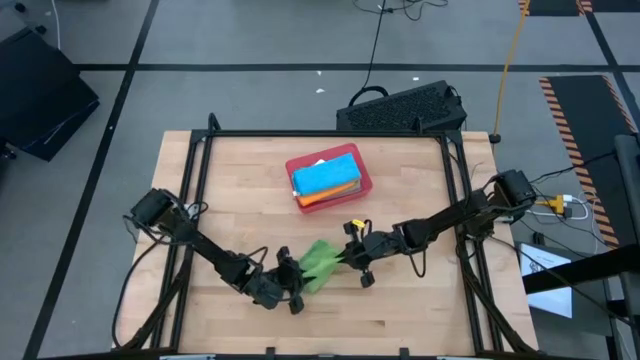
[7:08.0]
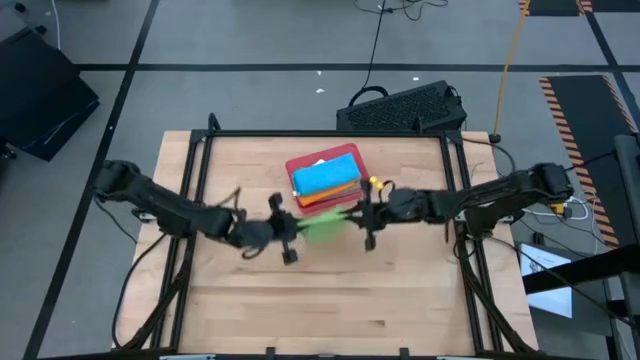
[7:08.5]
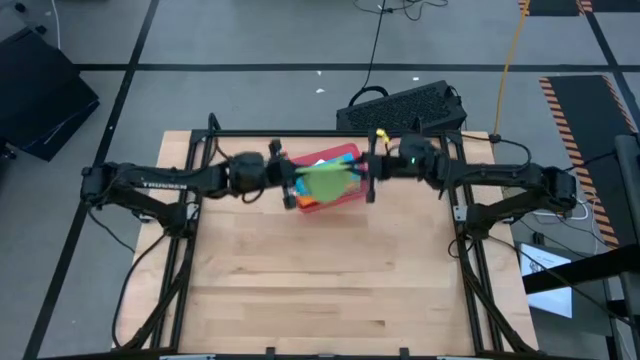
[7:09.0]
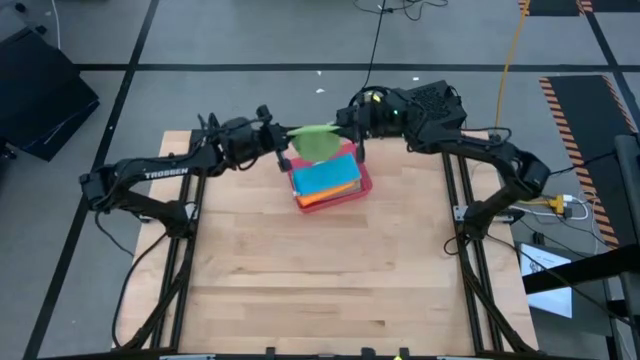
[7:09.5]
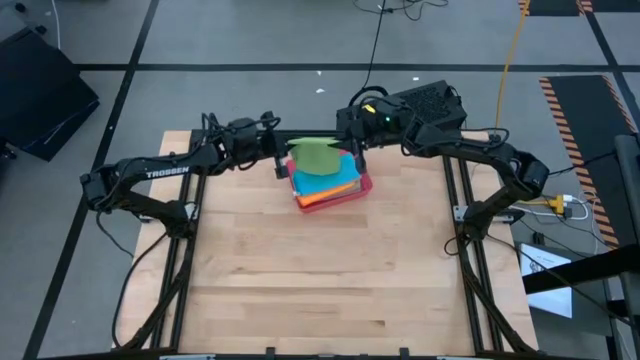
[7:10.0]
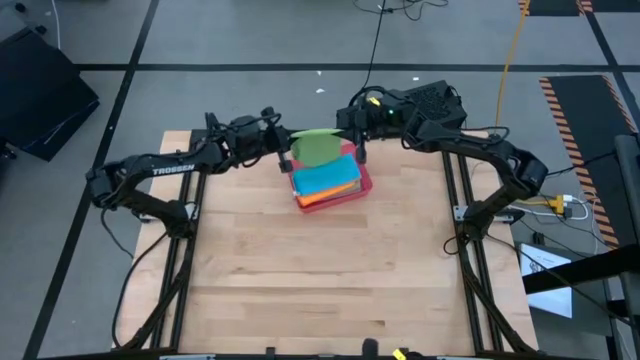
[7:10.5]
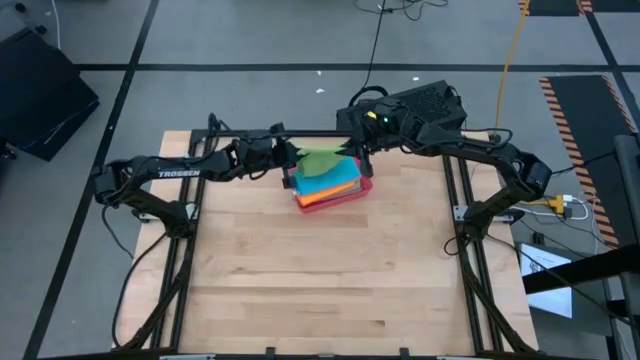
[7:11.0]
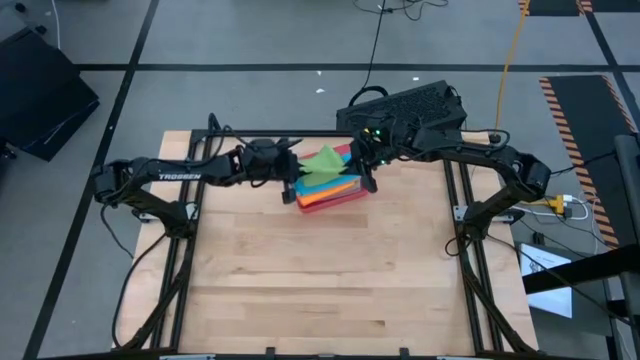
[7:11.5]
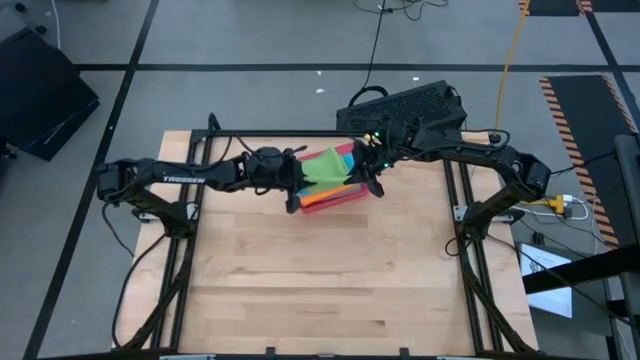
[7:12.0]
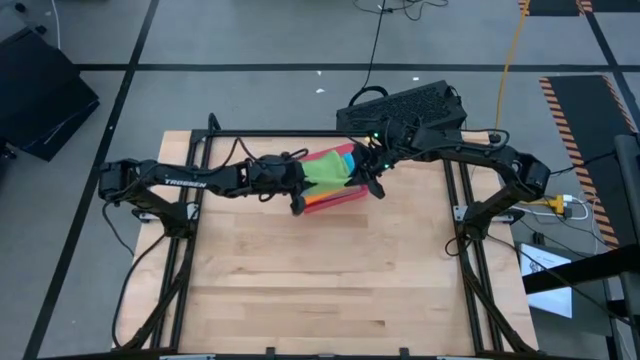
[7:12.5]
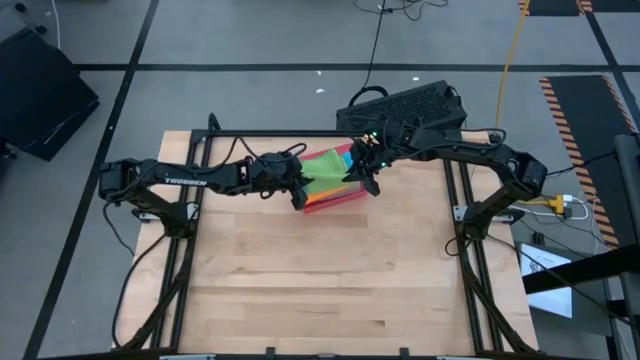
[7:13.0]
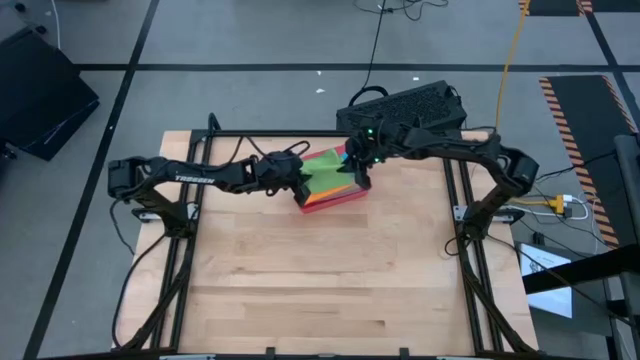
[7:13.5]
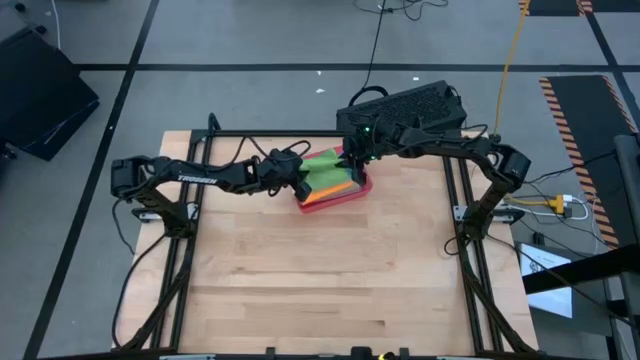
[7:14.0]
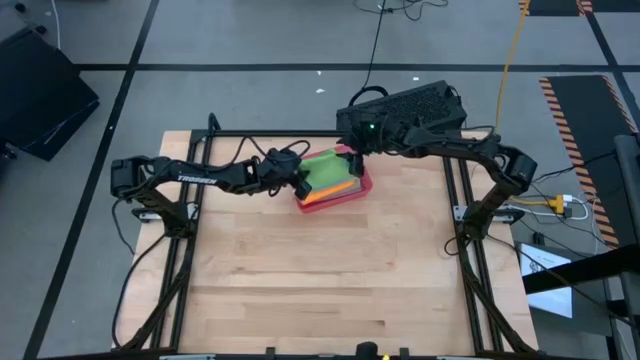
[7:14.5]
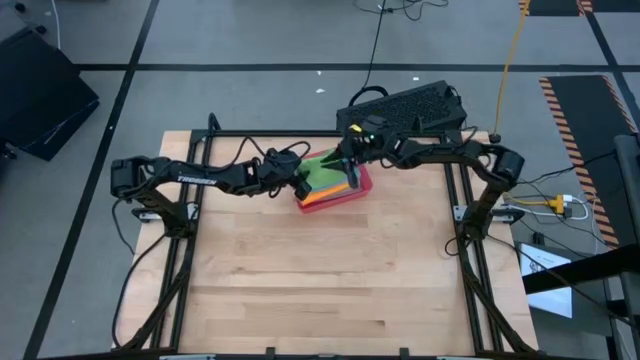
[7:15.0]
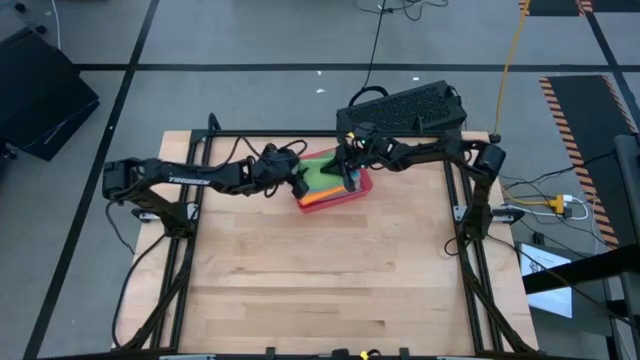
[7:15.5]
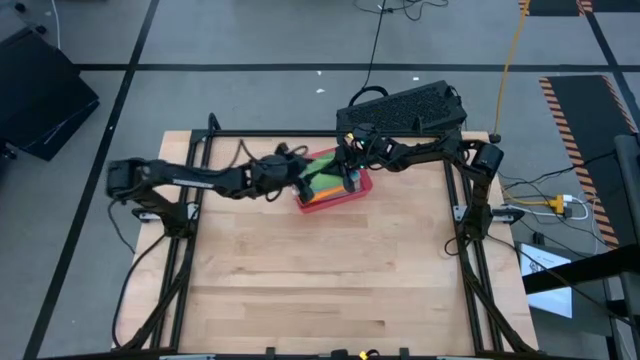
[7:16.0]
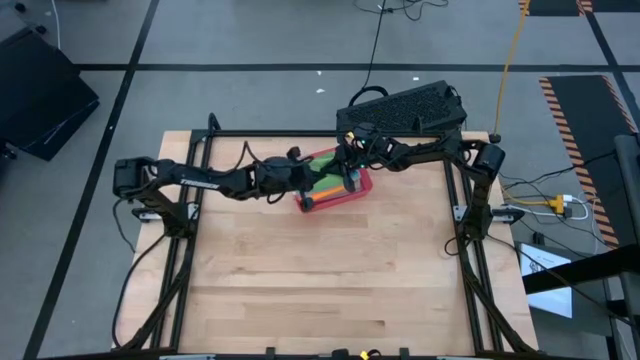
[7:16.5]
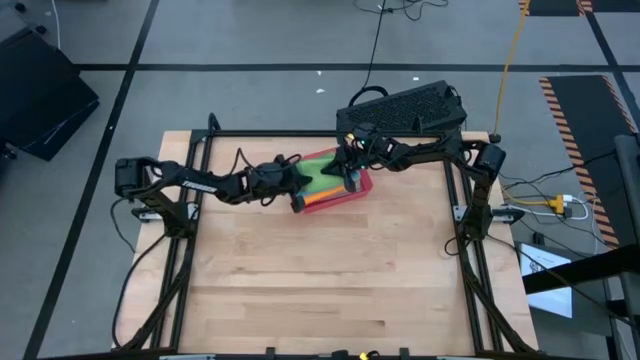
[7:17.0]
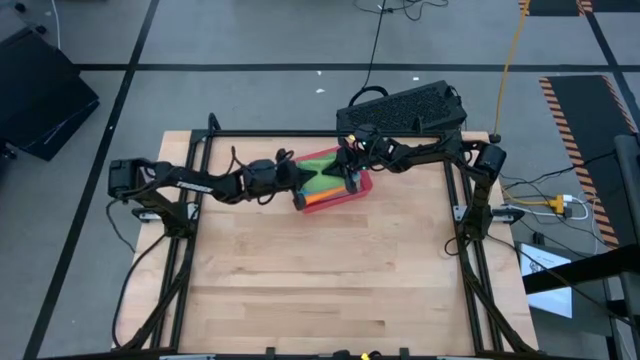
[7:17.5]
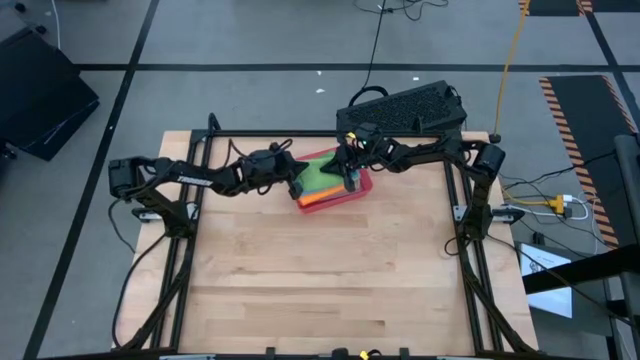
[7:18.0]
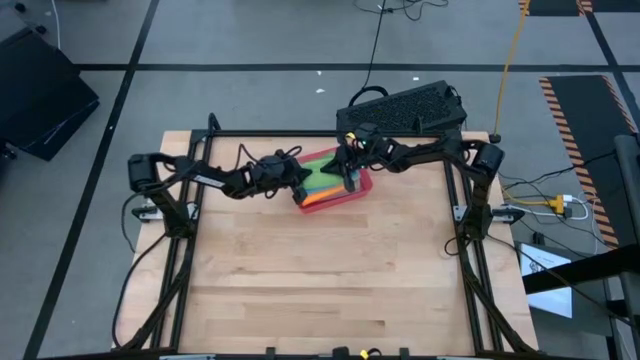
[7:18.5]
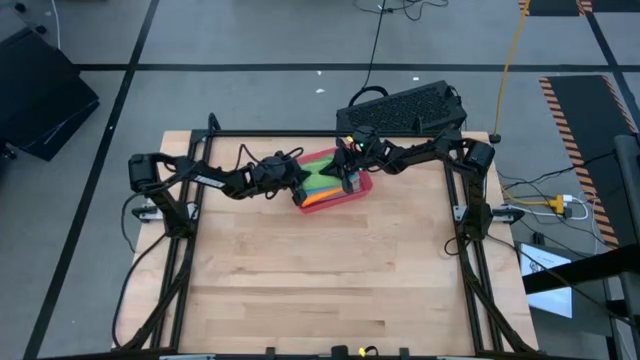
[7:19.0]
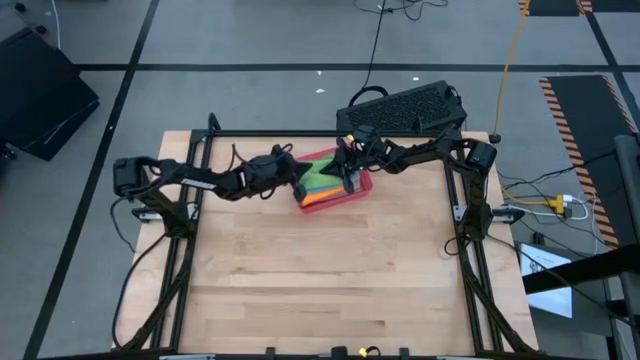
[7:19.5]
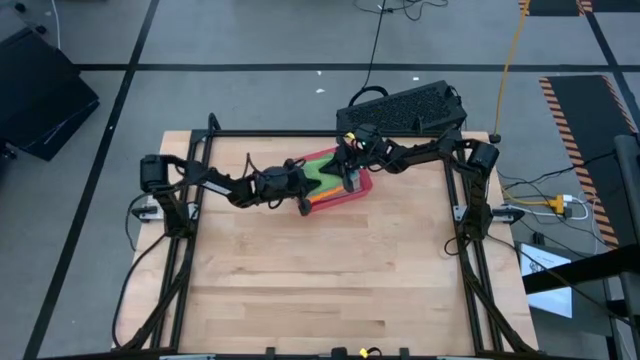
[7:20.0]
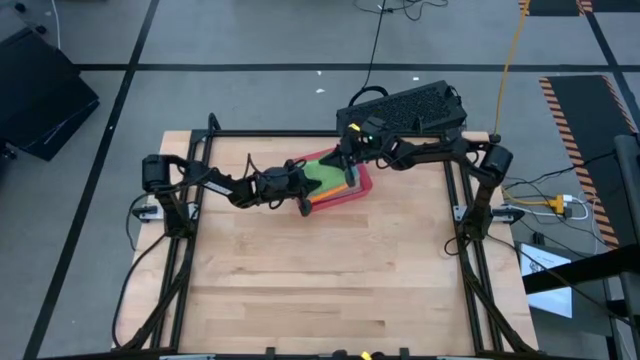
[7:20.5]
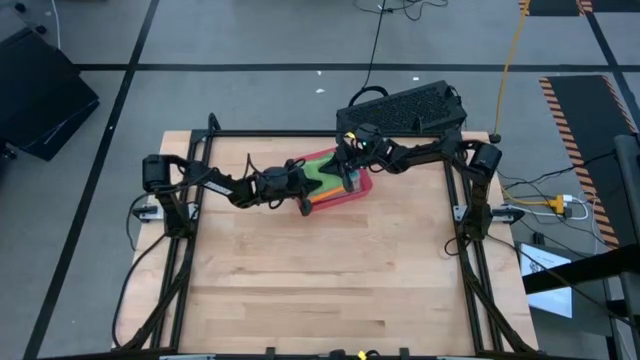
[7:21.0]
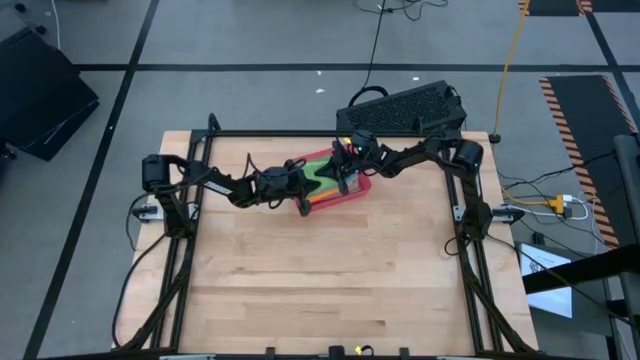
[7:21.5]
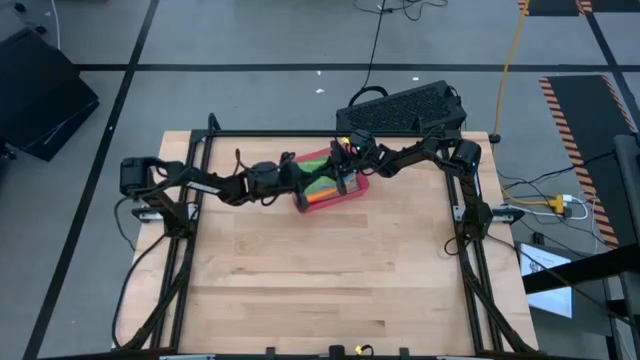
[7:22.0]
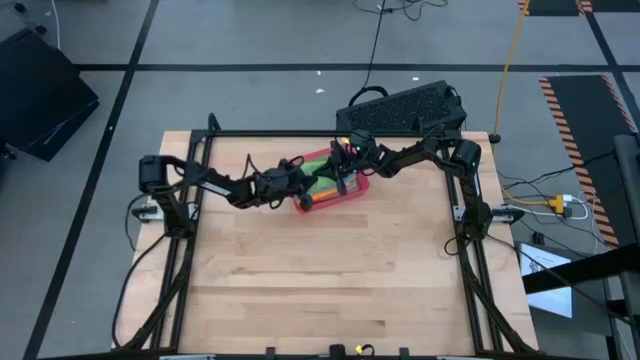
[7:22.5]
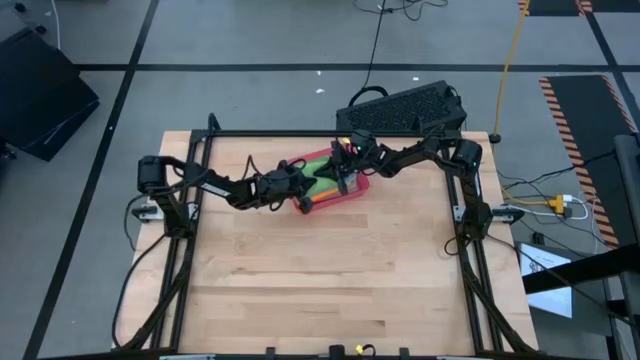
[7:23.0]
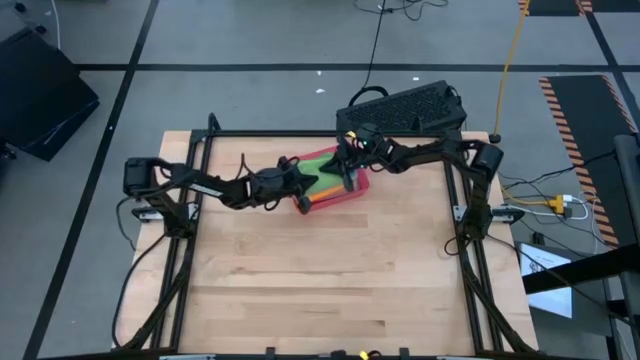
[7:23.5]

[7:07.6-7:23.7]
Task: Fold microfiber towels
Put the folded green microfiber cloth into the red bin
